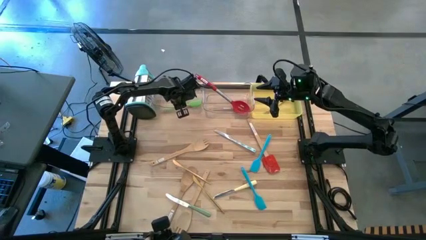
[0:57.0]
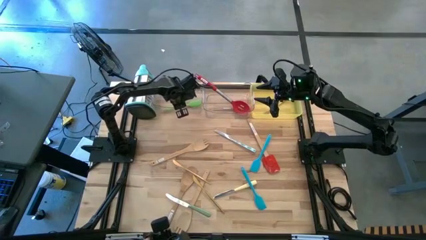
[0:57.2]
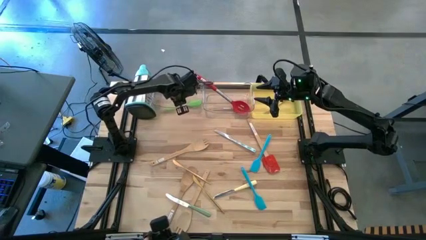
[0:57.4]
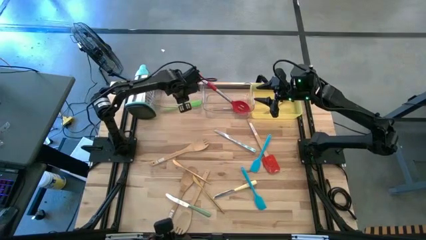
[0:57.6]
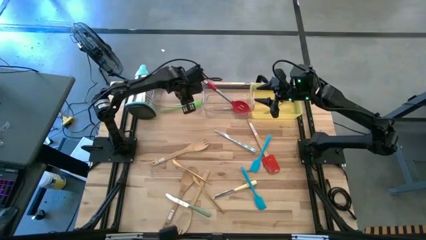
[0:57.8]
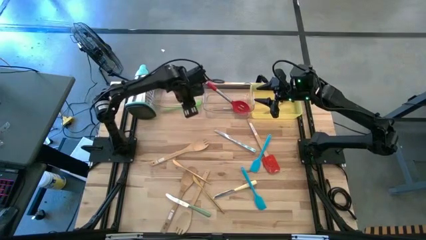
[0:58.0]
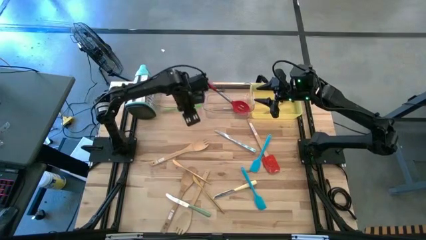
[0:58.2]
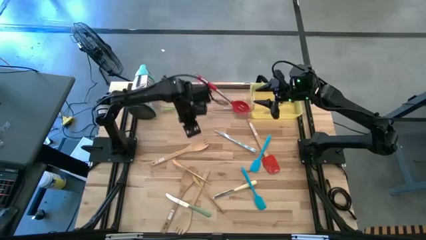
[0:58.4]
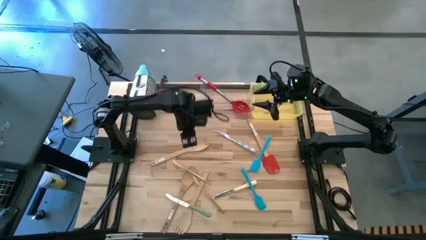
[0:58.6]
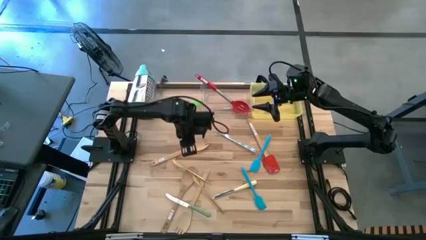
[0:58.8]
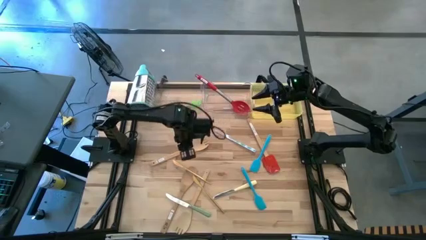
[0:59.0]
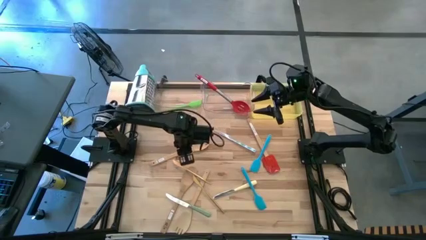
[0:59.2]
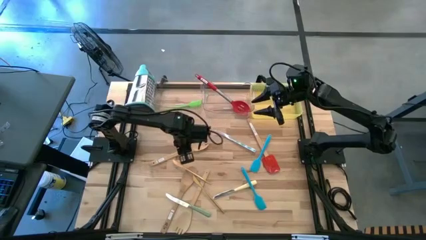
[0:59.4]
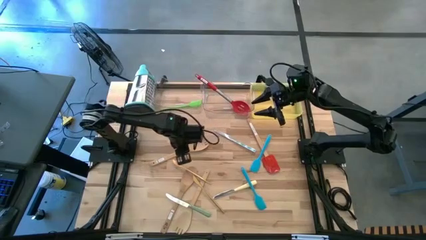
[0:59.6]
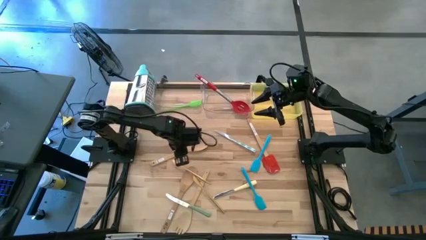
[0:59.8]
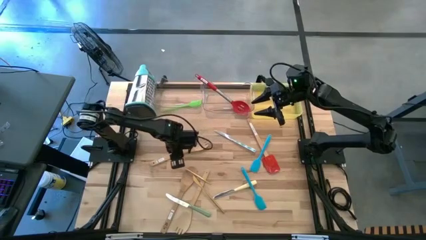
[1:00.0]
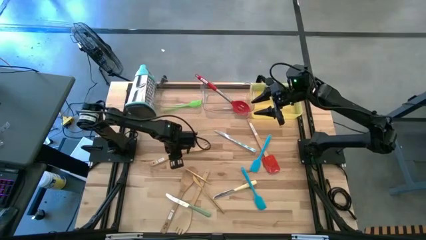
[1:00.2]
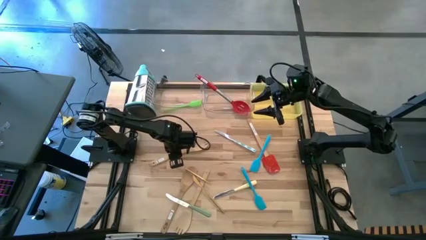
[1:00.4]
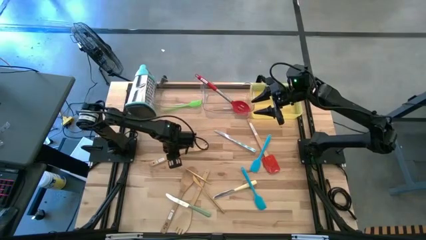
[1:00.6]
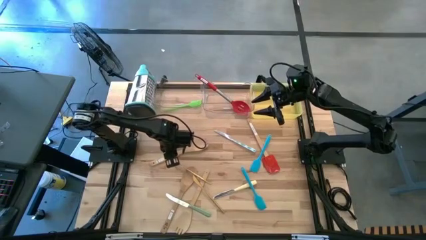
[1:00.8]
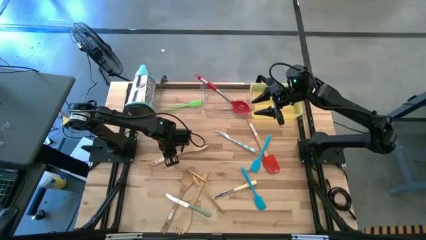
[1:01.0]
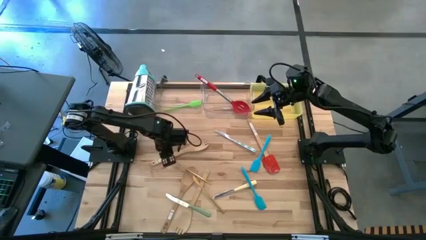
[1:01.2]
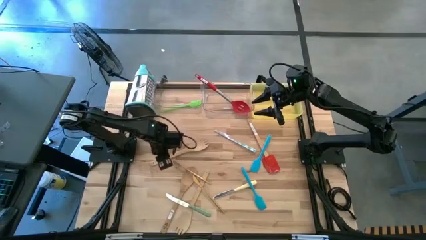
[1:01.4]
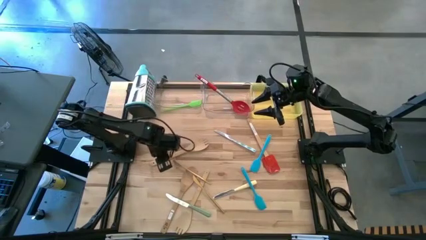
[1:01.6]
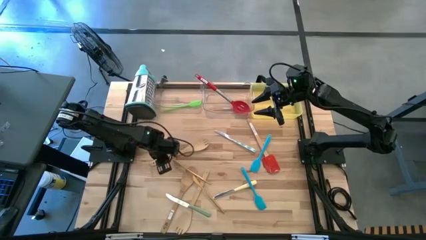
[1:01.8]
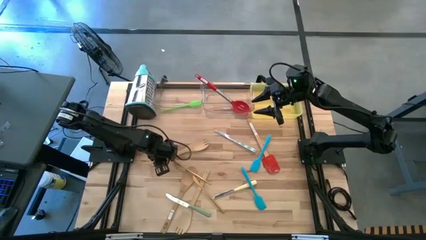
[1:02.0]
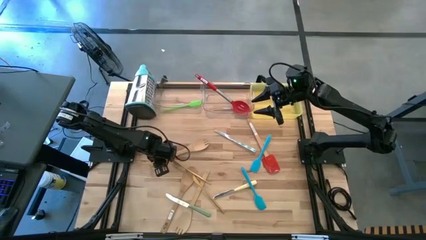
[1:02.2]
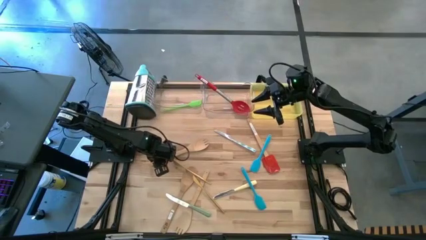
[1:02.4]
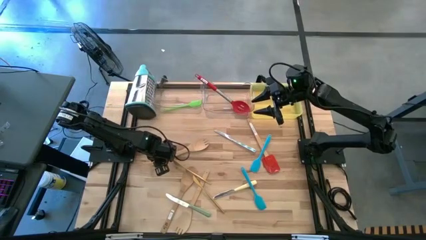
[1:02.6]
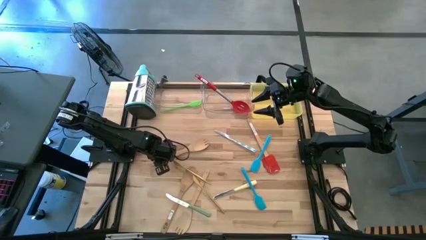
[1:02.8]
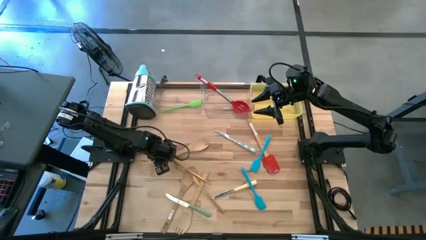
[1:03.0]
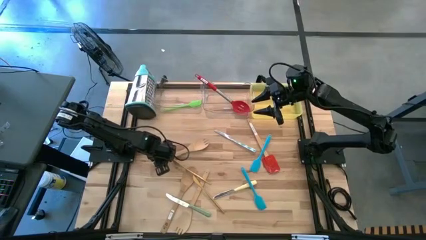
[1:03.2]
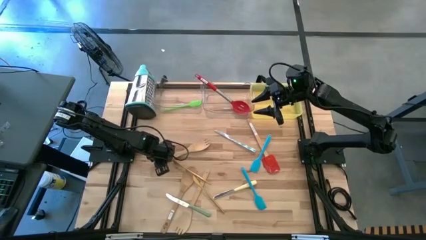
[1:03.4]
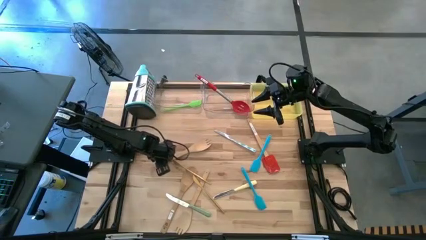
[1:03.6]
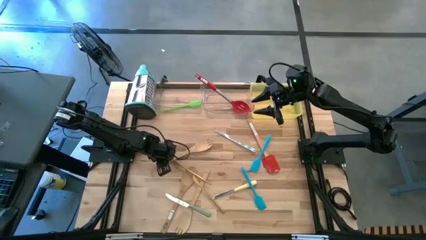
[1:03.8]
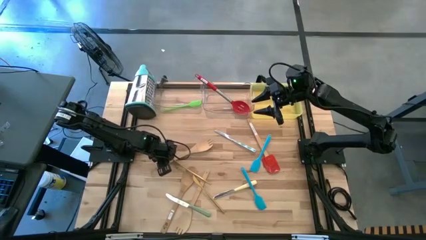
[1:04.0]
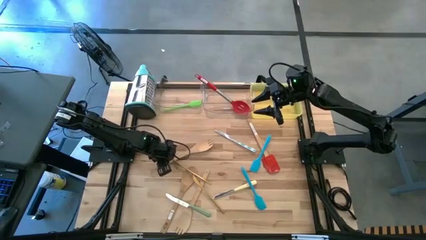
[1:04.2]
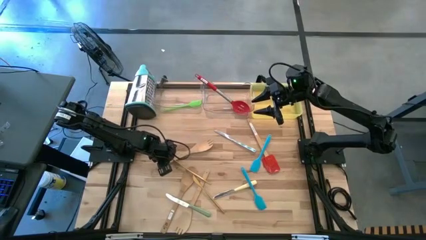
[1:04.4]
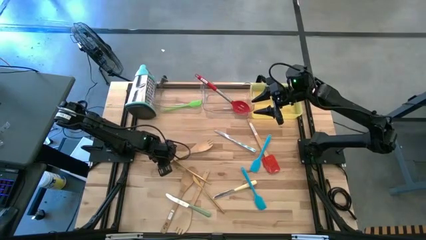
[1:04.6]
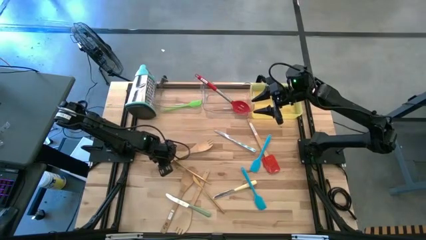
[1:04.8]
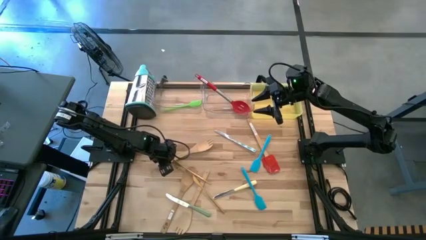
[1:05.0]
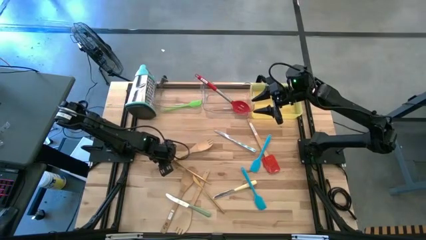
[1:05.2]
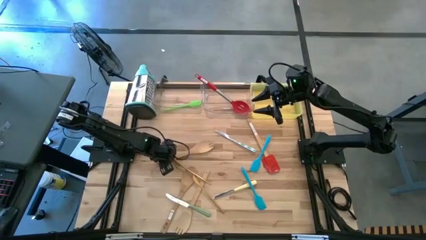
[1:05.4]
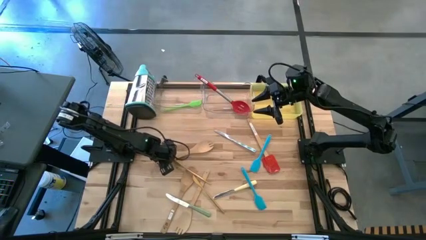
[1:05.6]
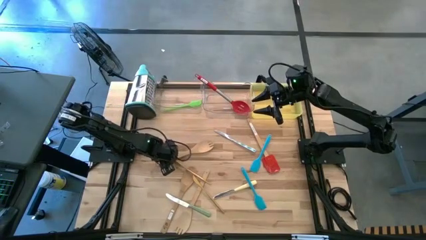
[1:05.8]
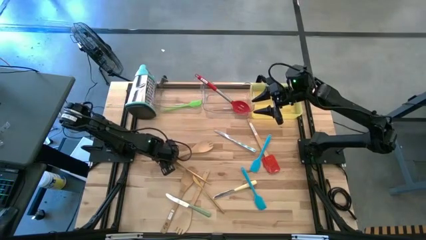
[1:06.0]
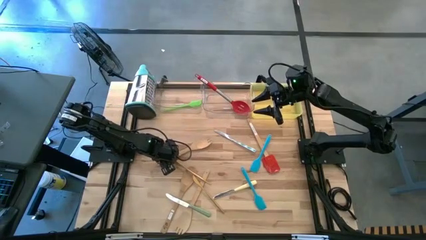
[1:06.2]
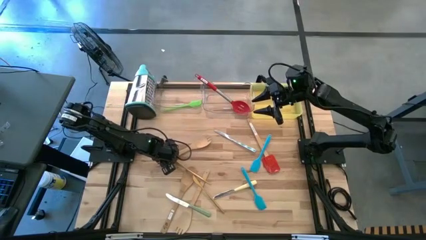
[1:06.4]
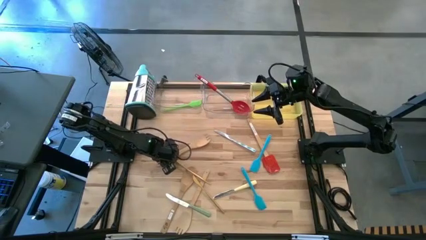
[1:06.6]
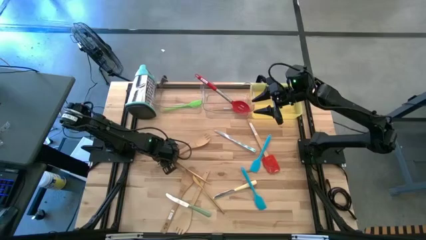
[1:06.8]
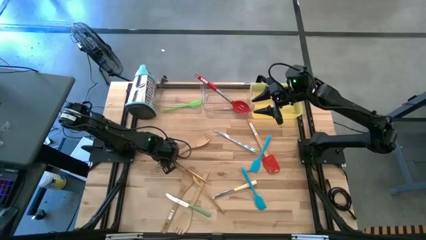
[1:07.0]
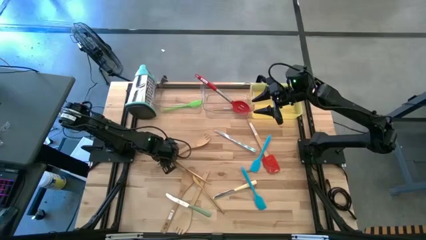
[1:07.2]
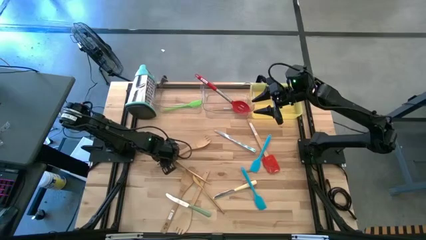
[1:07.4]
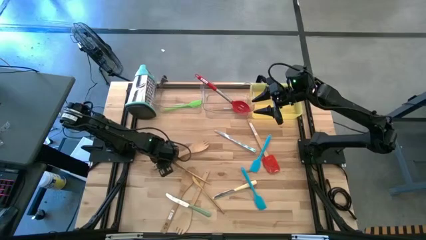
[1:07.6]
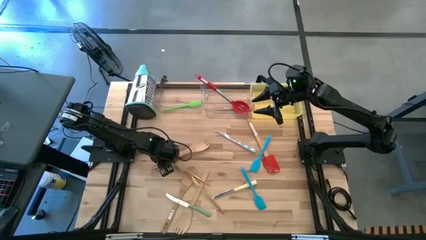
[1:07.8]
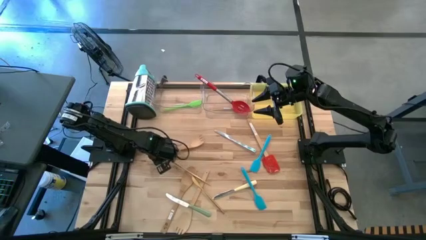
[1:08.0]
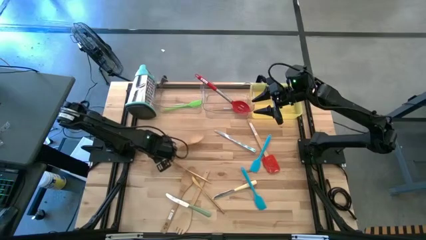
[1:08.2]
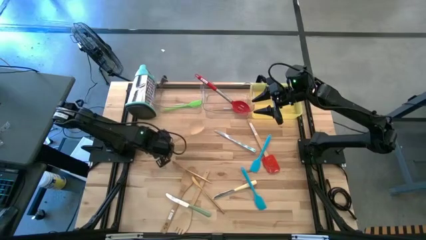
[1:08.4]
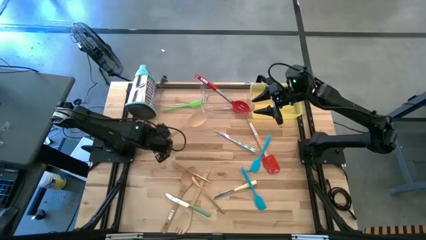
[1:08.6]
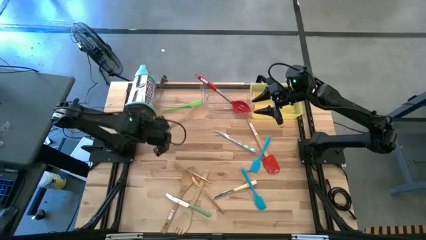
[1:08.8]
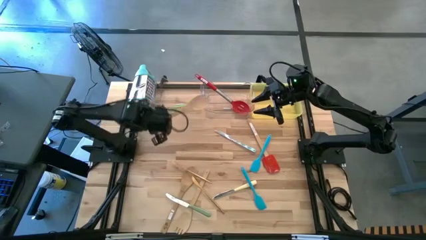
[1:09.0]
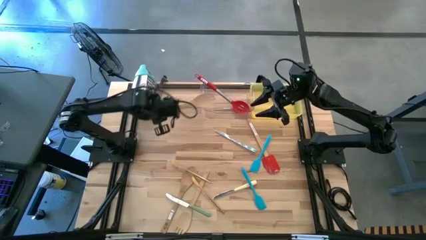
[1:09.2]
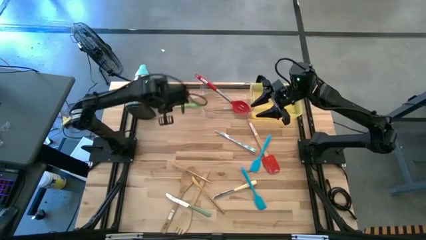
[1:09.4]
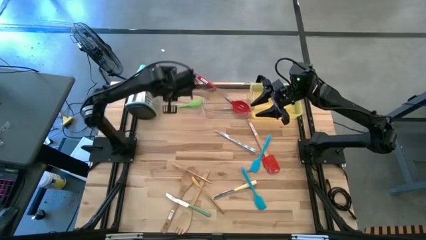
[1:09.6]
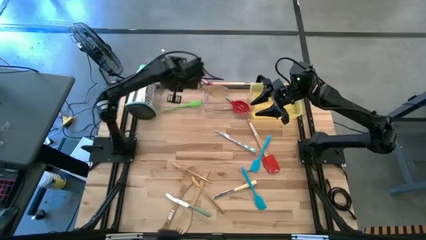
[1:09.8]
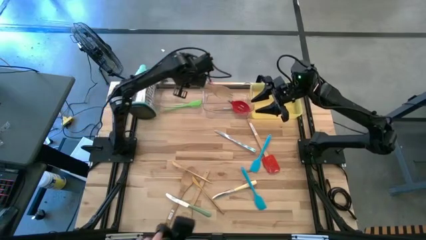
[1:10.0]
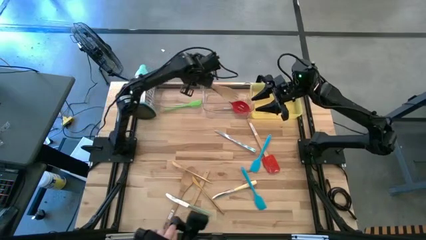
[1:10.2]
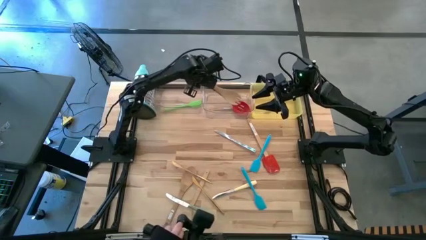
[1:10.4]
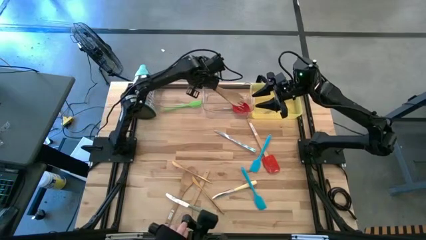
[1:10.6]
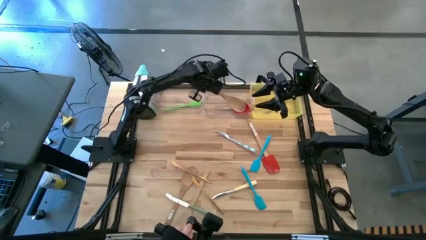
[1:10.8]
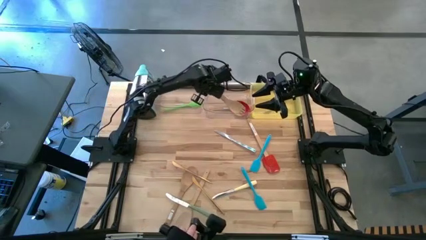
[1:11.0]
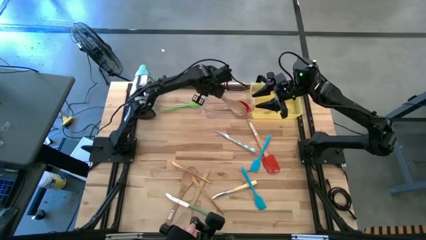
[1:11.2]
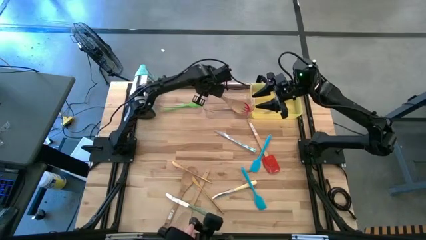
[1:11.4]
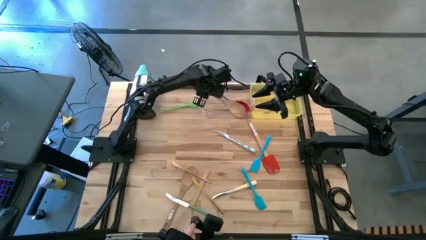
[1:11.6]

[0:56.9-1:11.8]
Task: Pick & Place Kitchen Items
Put the top brown serving spork into the right transparent bin

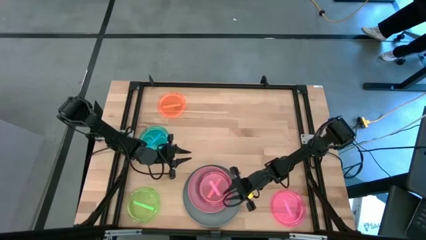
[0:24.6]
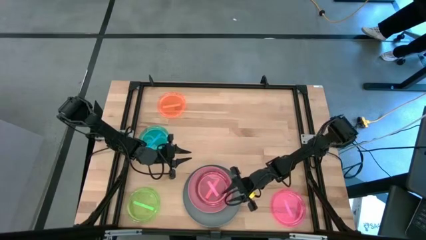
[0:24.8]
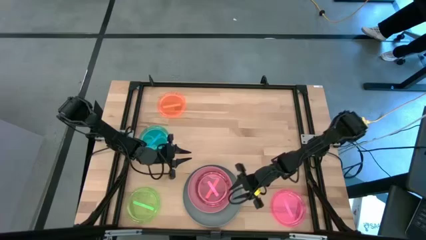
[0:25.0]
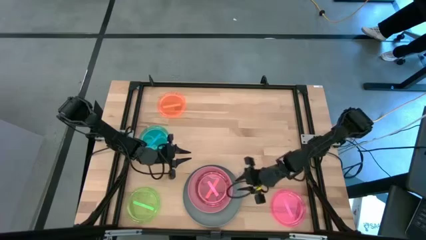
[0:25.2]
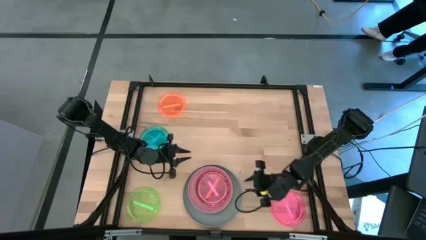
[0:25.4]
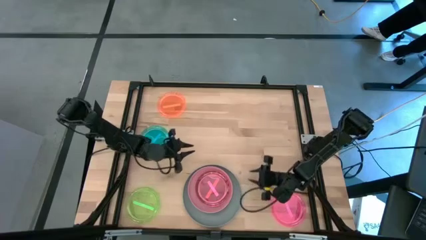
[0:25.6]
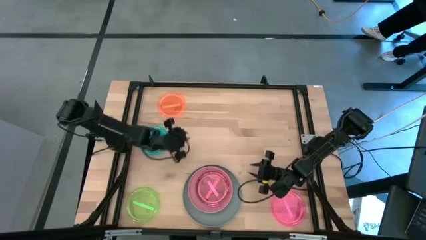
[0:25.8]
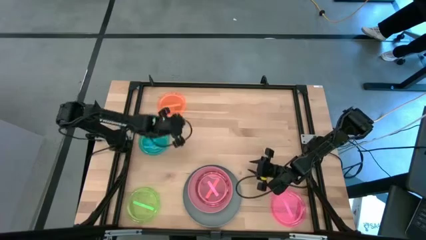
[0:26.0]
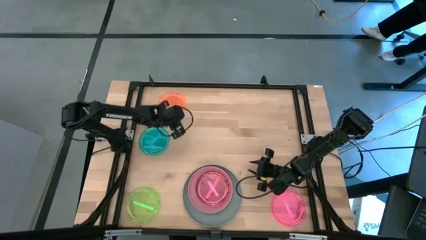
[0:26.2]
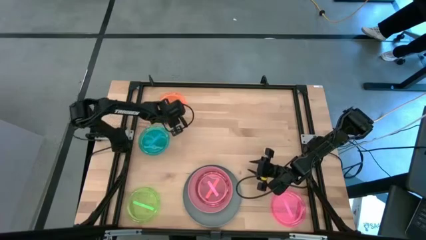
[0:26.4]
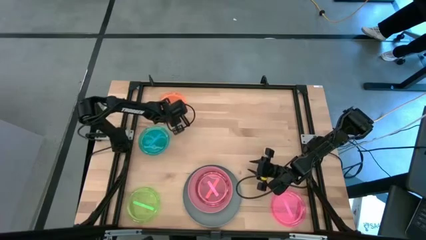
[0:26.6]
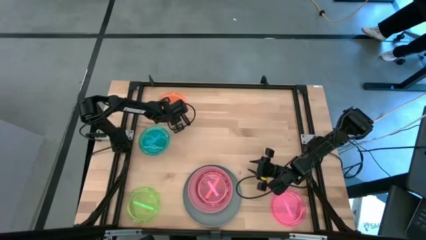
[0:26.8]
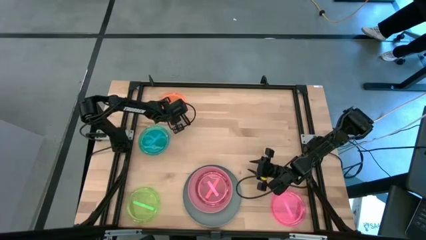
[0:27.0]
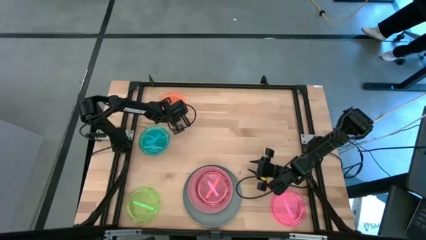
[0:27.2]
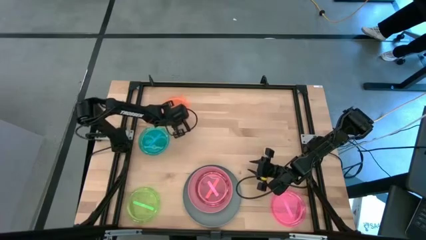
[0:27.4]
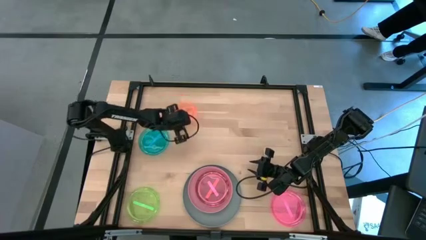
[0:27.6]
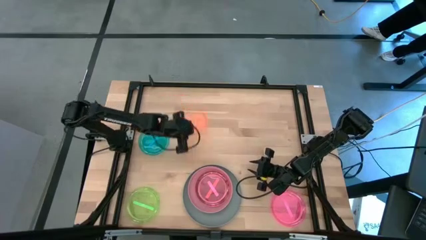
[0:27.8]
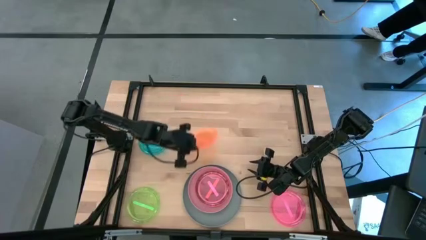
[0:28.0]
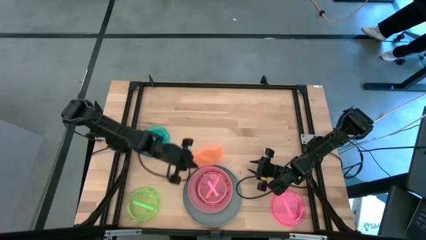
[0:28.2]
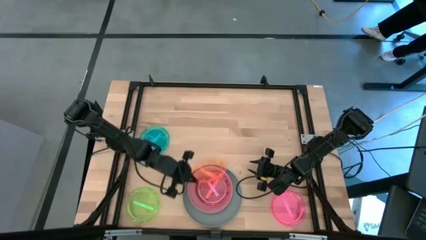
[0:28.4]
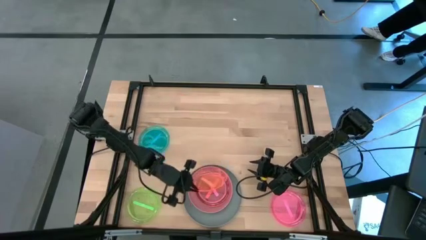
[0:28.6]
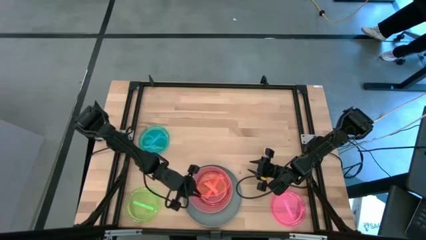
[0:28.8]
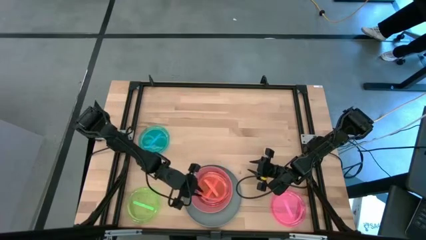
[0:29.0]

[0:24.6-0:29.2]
Task: Stack plastic plates
Stack the orange plate on top of the other orange plate
